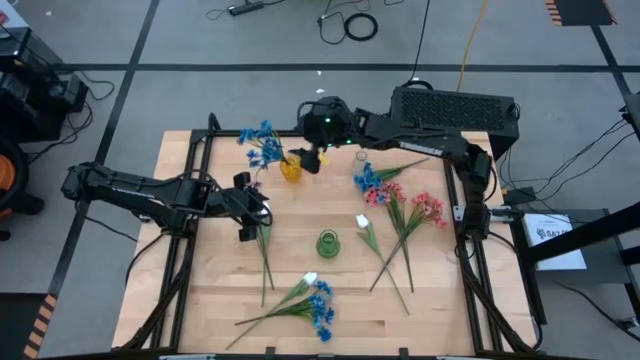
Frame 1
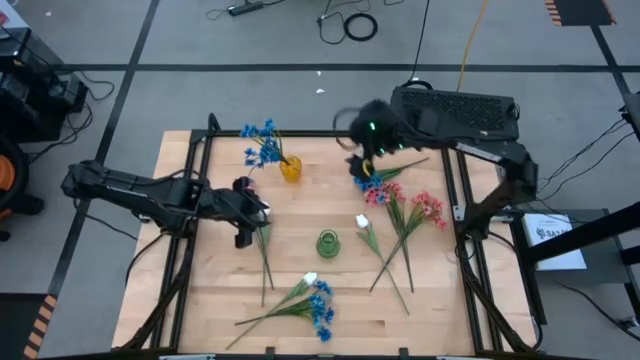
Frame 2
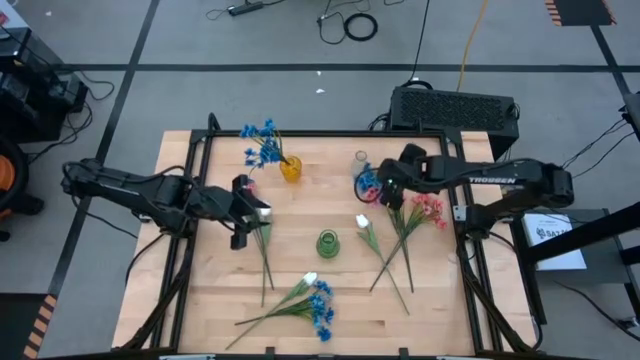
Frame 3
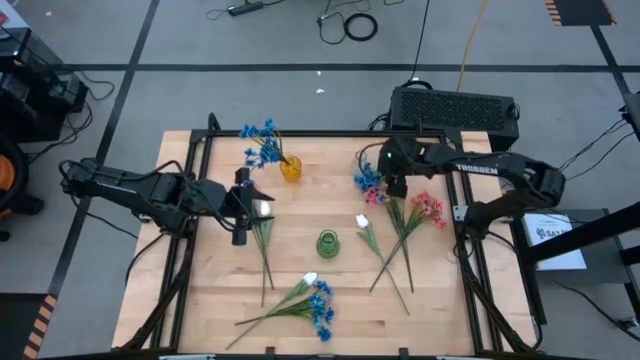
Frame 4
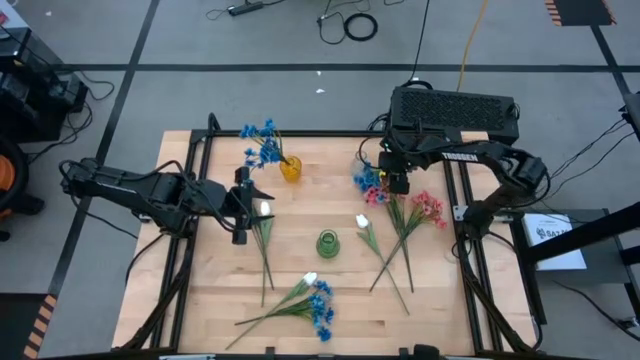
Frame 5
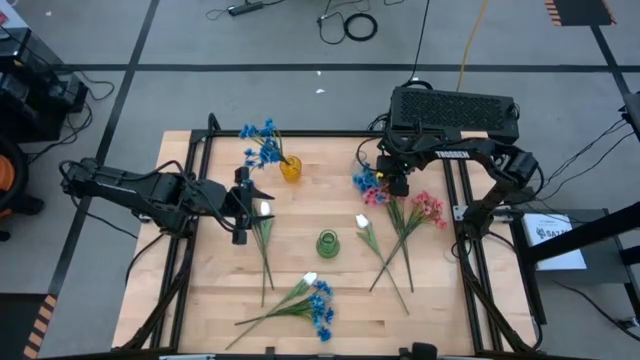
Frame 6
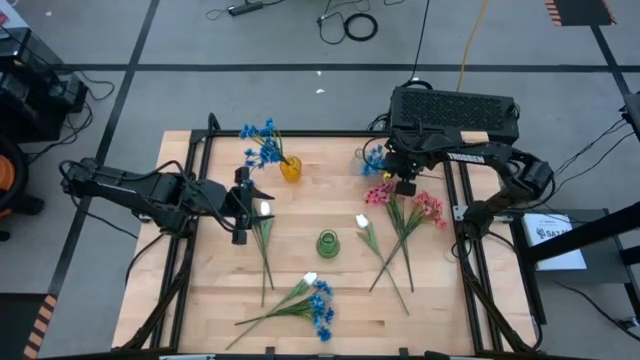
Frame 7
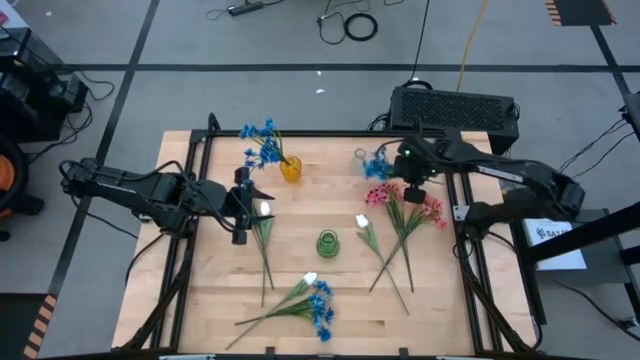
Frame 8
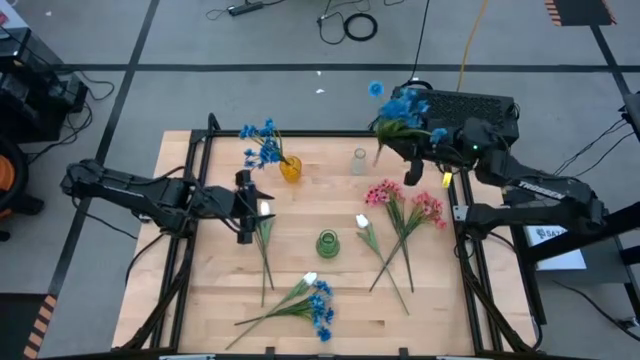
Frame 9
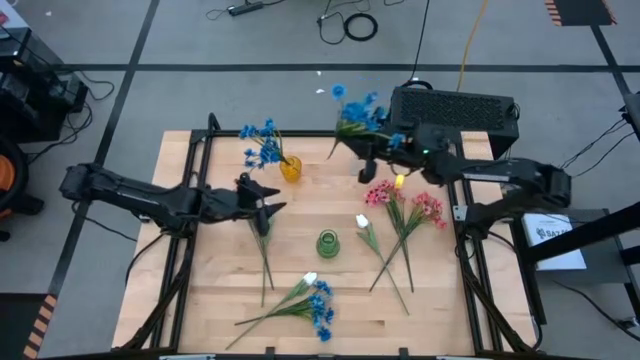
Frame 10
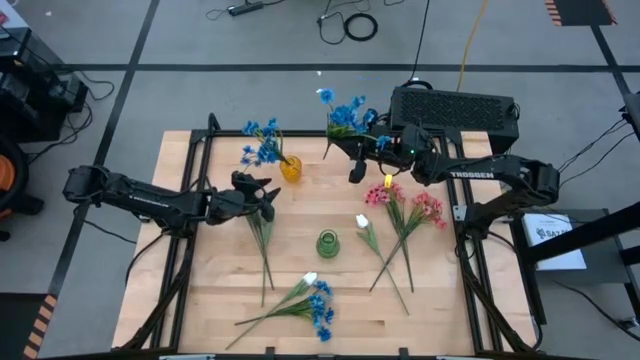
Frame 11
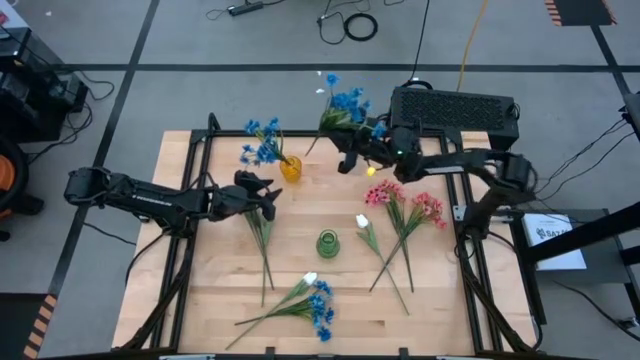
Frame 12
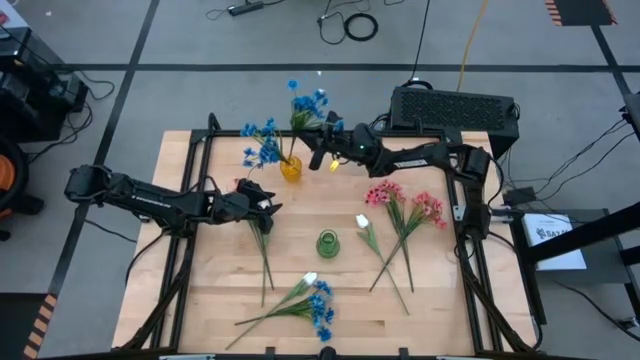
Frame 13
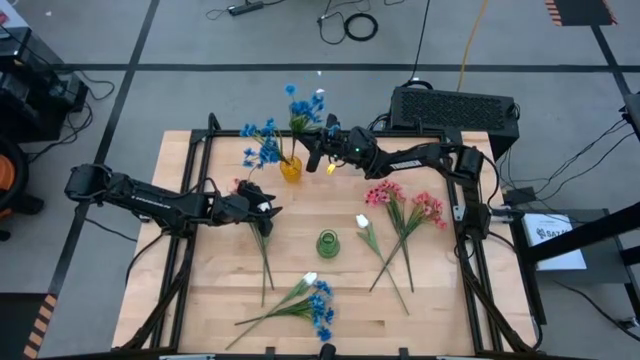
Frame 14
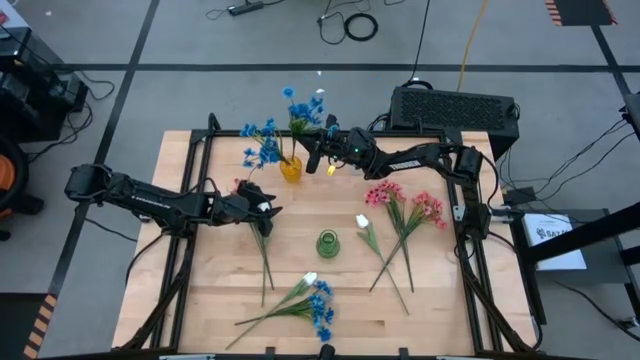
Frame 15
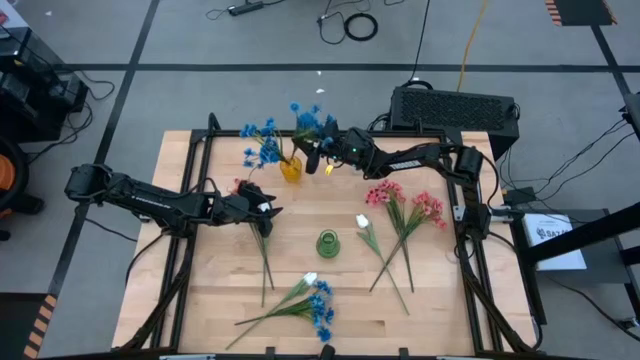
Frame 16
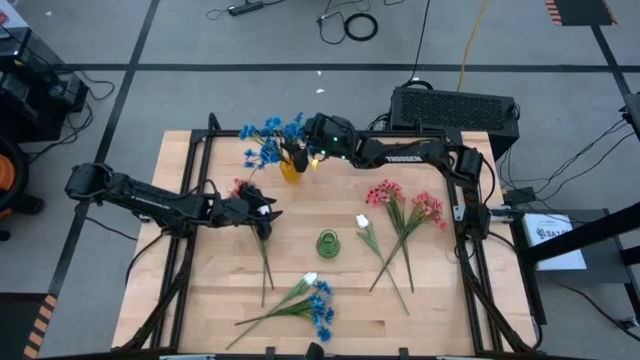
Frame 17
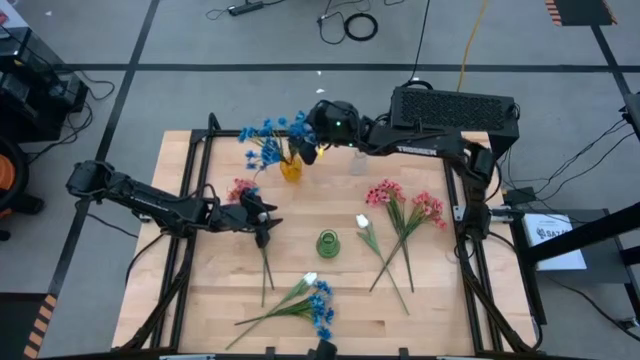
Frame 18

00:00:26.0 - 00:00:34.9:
Task: Sort flowers into vase by color
Put the top blue flowers into the yellow vase

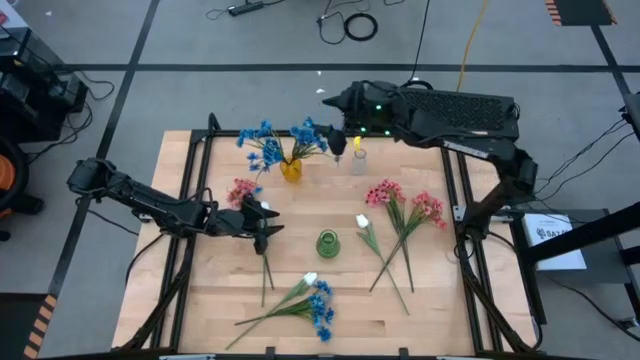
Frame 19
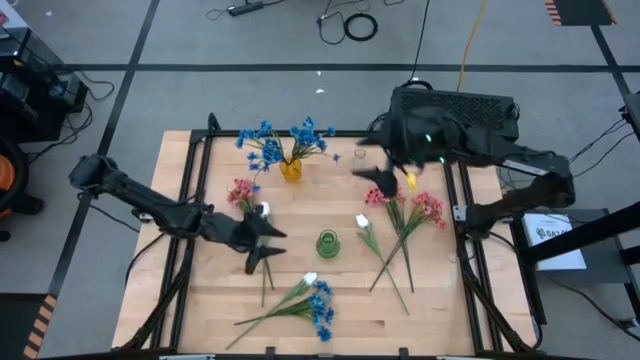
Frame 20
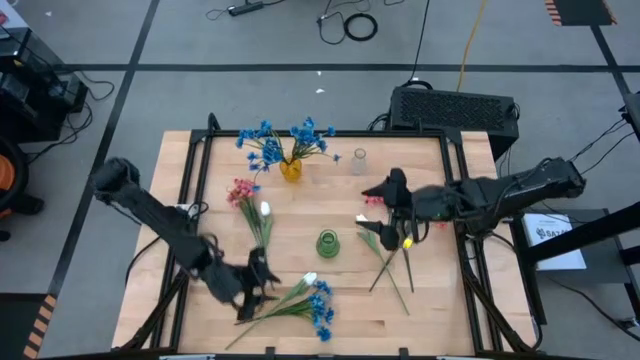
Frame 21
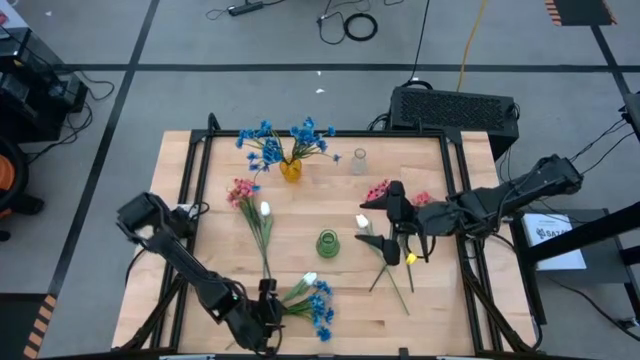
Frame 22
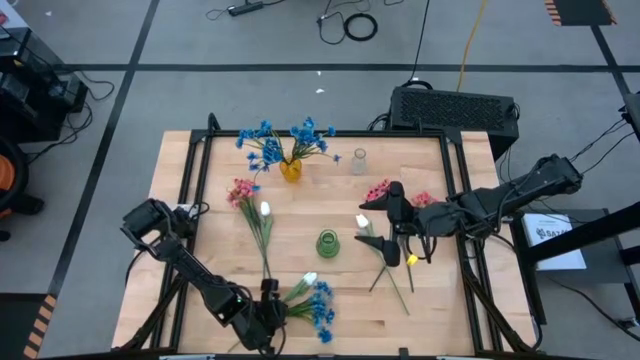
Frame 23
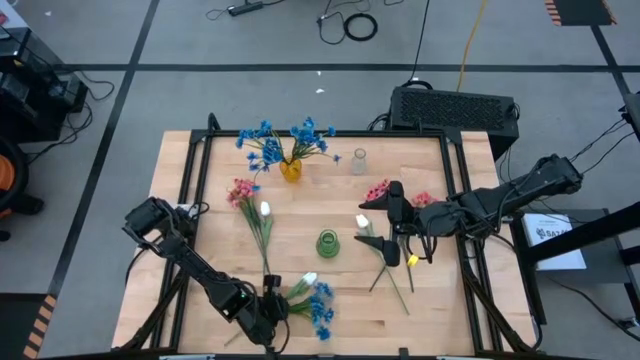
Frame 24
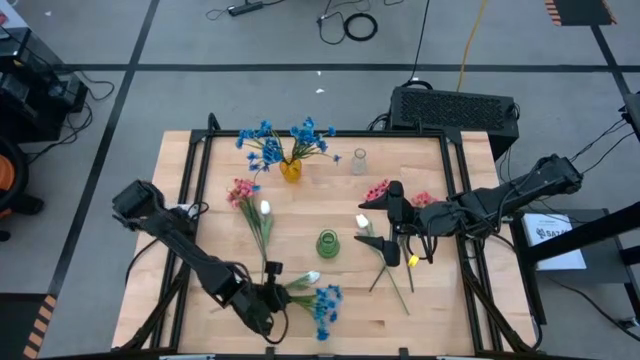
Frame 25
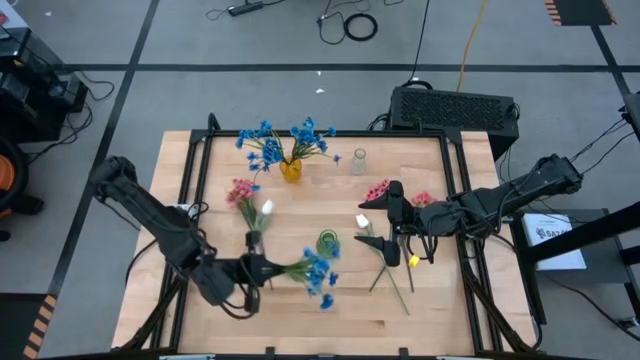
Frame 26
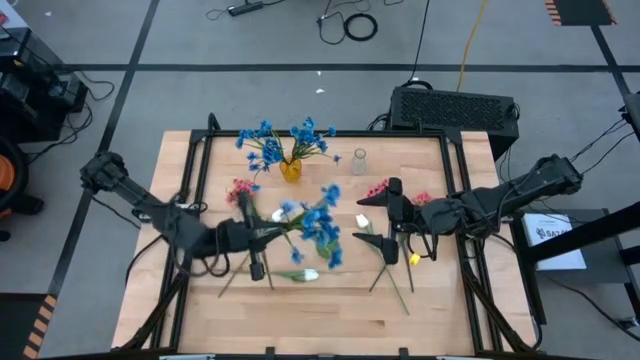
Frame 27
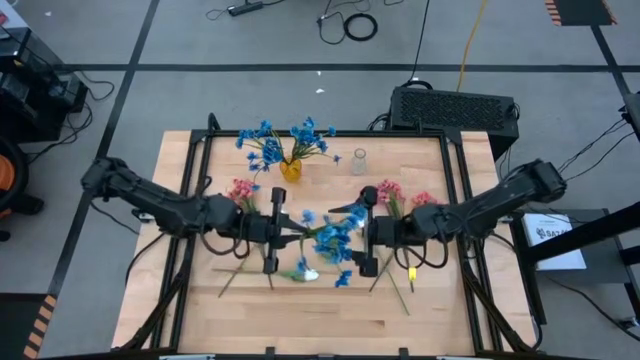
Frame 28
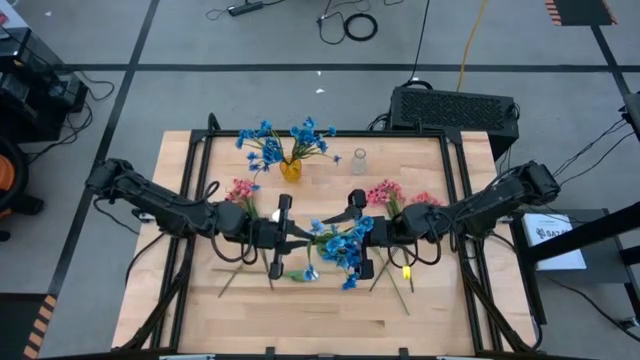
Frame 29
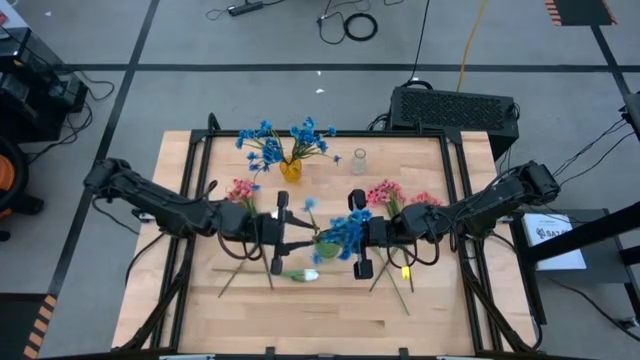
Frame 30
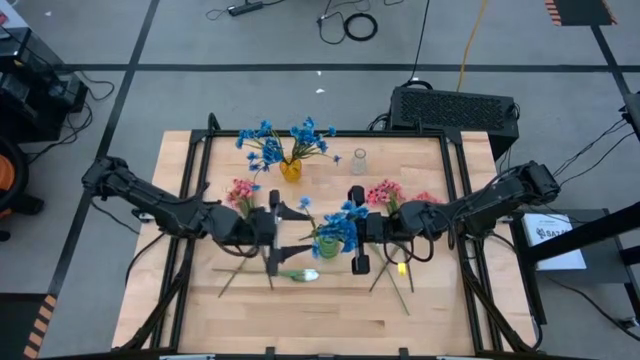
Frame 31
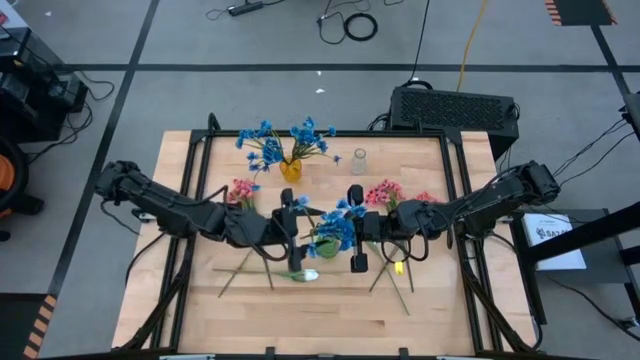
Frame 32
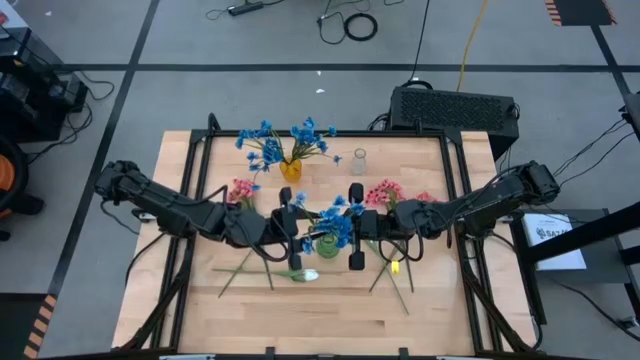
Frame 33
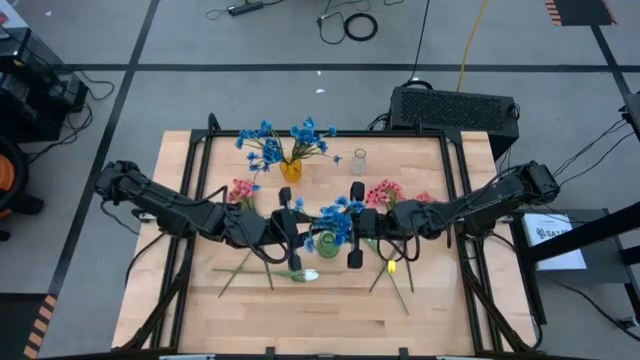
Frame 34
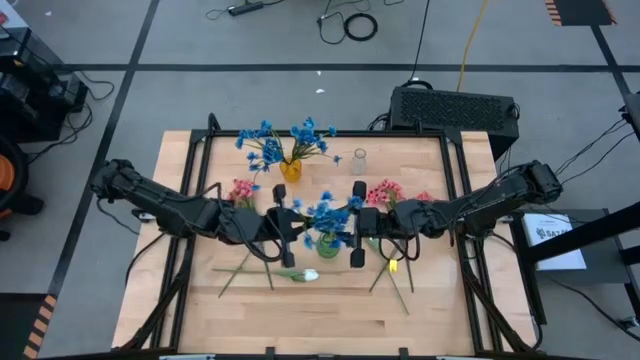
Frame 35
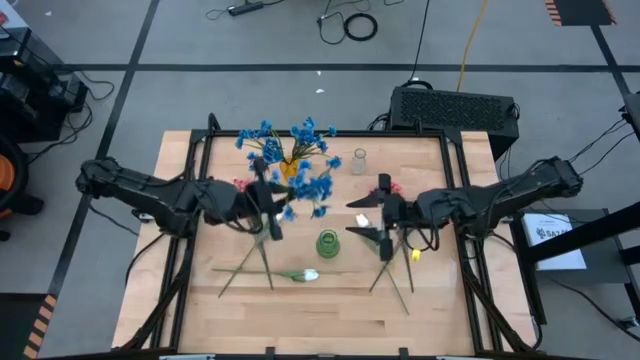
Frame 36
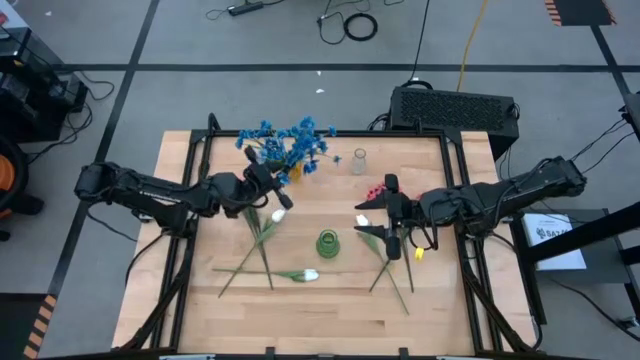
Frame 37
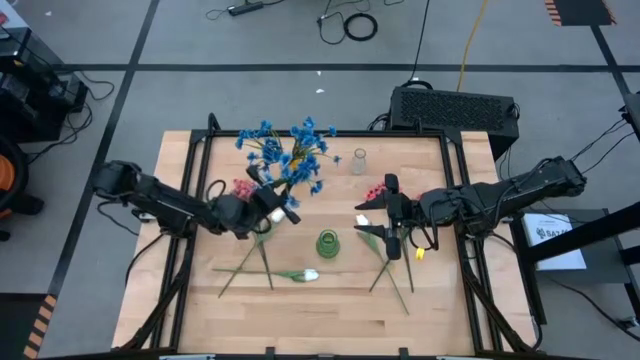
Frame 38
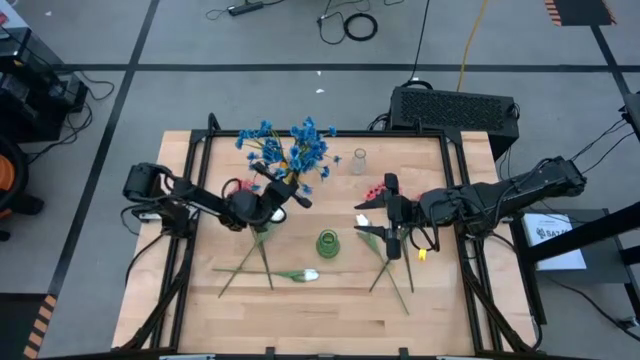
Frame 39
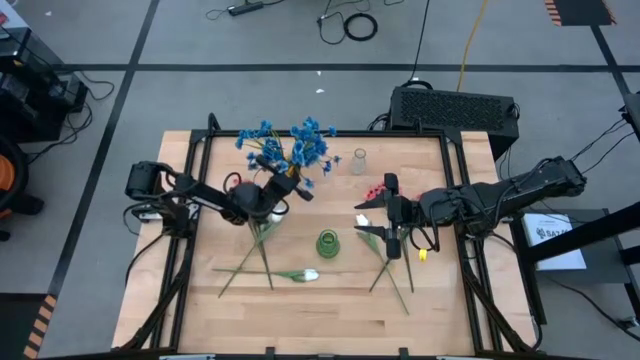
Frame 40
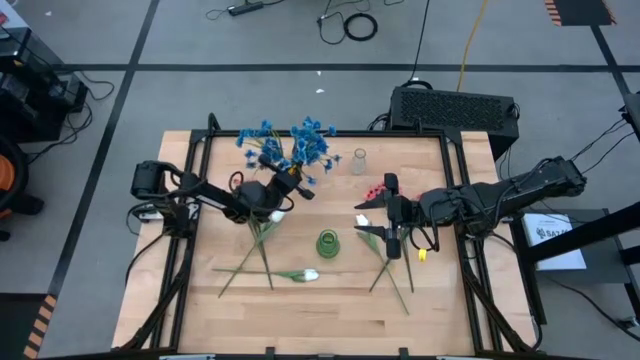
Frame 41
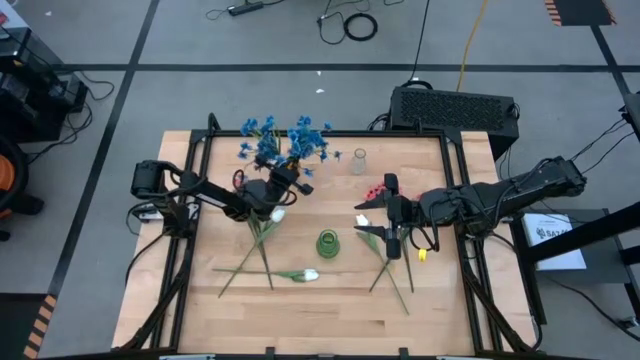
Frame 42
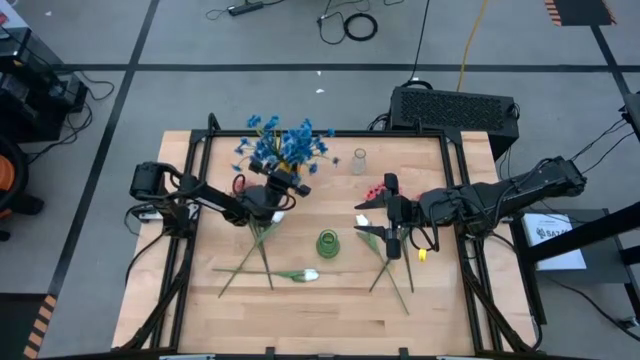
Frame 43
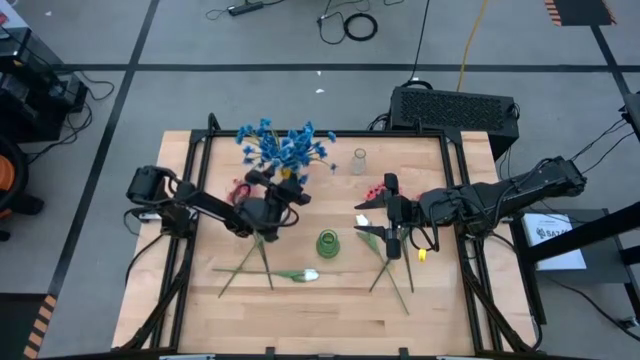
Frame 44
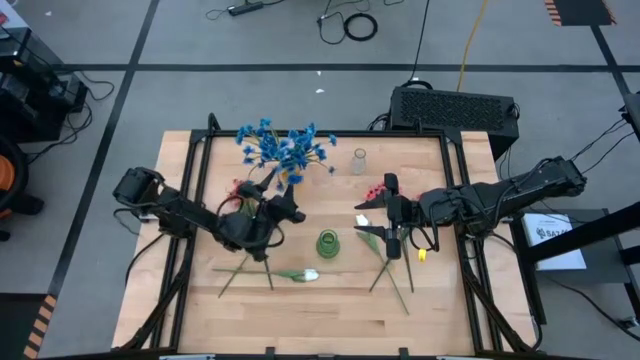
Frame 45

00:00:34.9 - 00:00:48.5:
Put the blue flowers into the yellow vase
